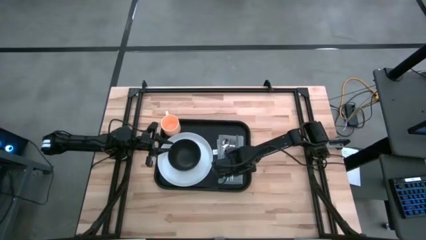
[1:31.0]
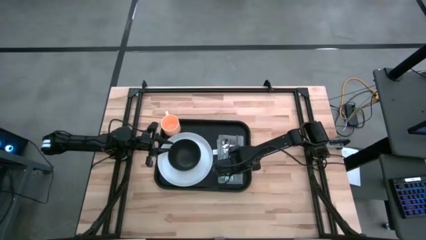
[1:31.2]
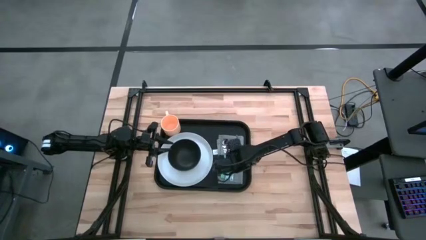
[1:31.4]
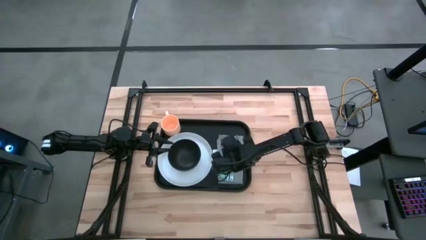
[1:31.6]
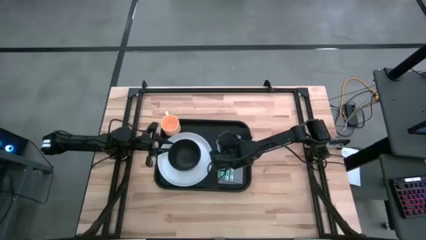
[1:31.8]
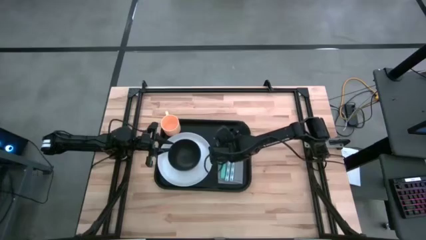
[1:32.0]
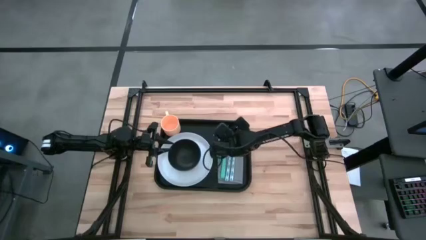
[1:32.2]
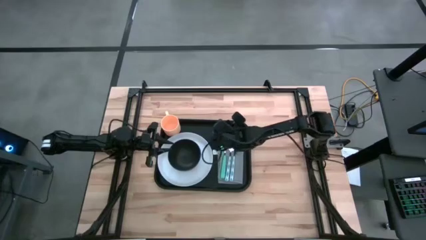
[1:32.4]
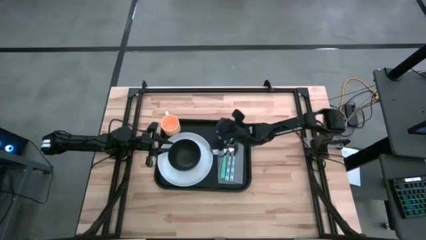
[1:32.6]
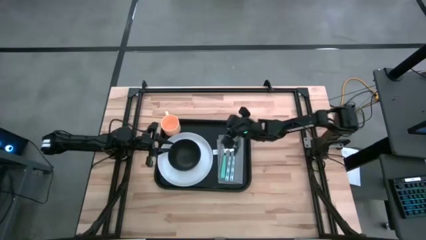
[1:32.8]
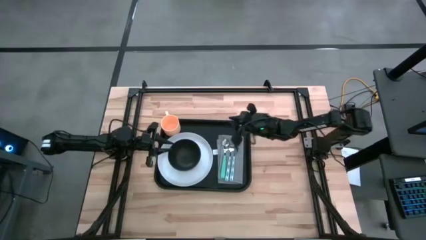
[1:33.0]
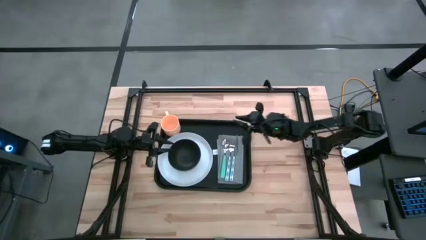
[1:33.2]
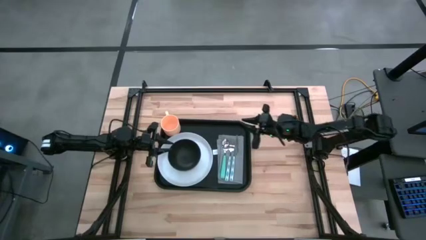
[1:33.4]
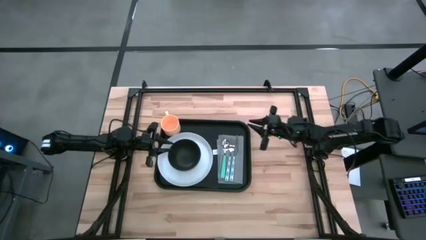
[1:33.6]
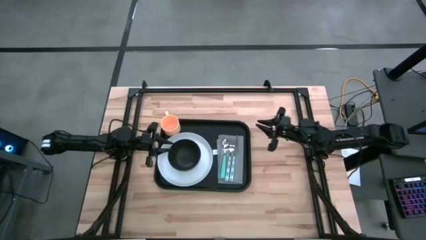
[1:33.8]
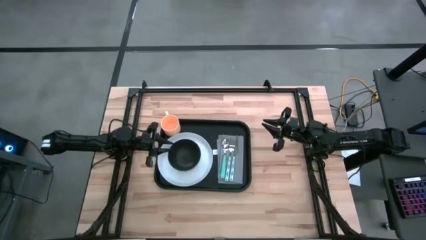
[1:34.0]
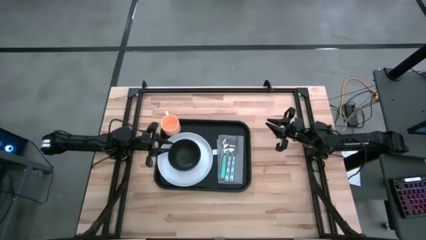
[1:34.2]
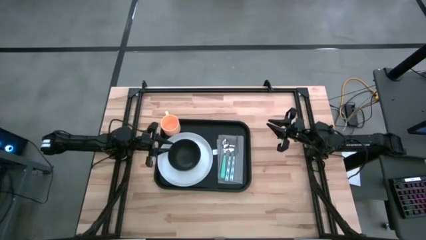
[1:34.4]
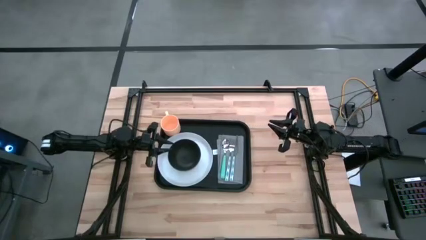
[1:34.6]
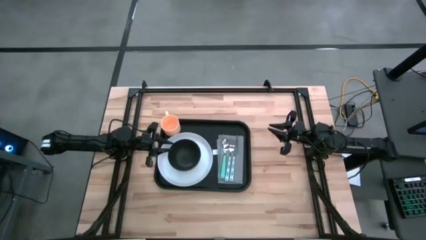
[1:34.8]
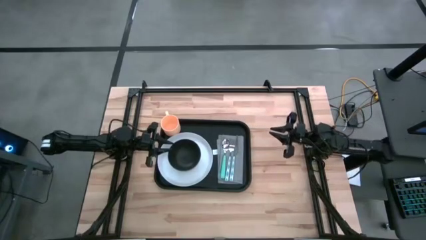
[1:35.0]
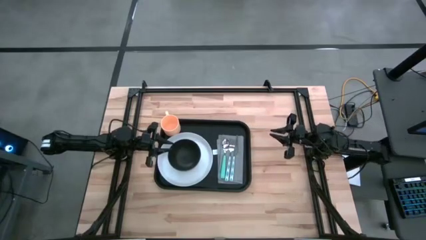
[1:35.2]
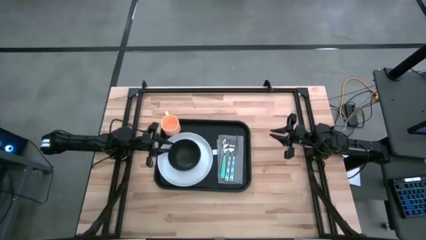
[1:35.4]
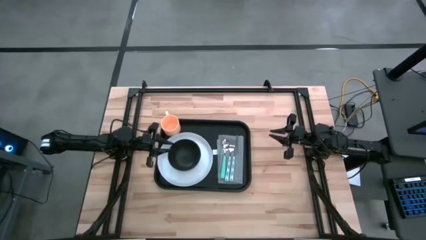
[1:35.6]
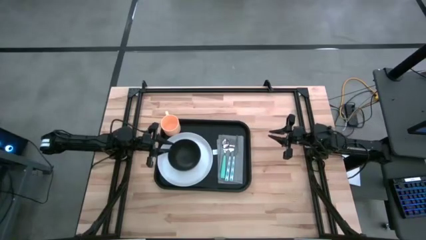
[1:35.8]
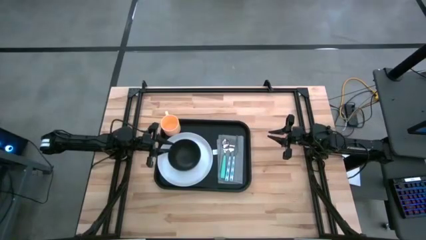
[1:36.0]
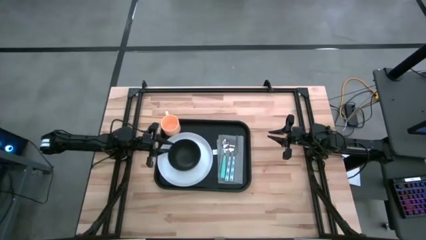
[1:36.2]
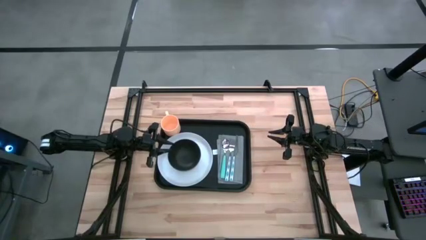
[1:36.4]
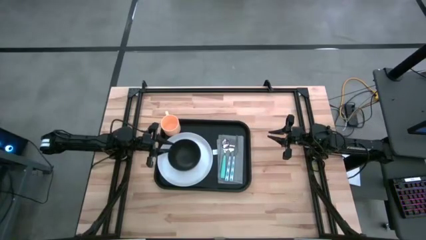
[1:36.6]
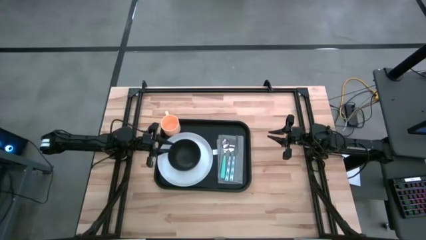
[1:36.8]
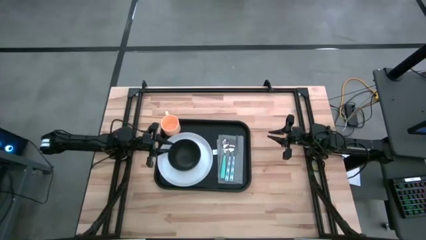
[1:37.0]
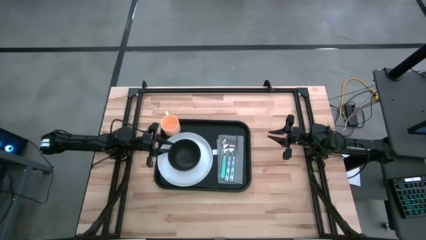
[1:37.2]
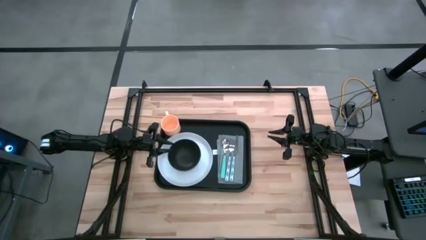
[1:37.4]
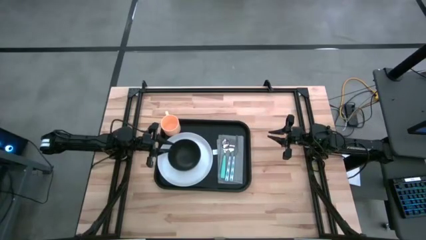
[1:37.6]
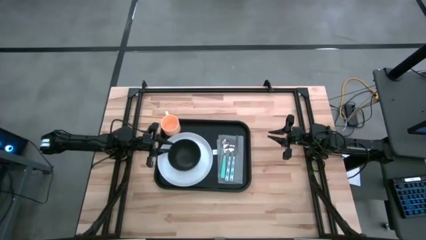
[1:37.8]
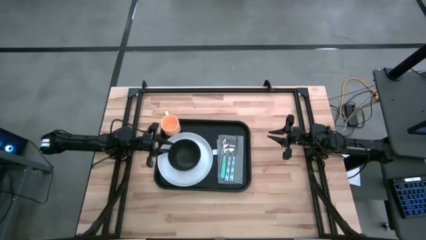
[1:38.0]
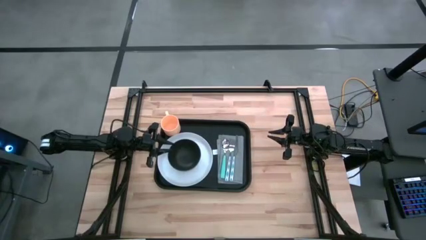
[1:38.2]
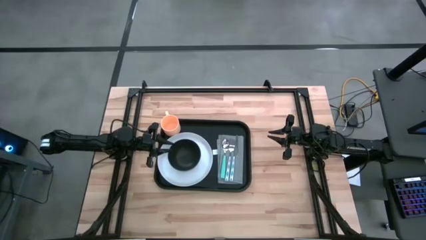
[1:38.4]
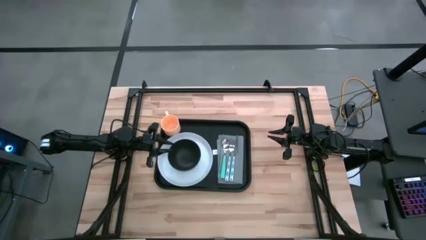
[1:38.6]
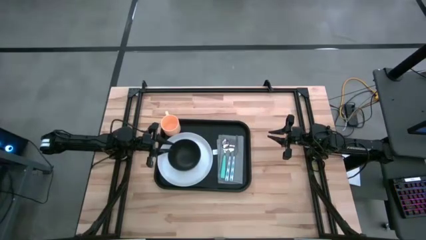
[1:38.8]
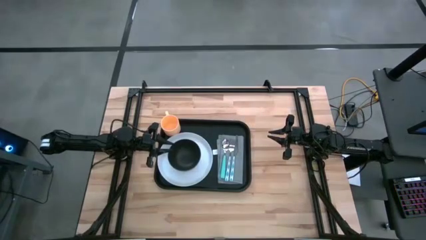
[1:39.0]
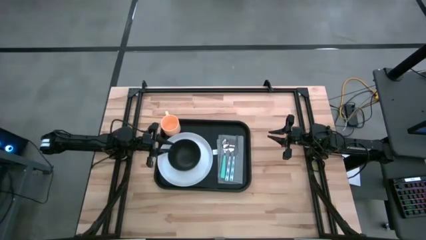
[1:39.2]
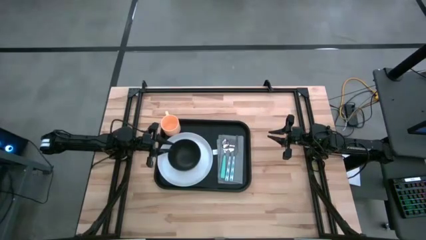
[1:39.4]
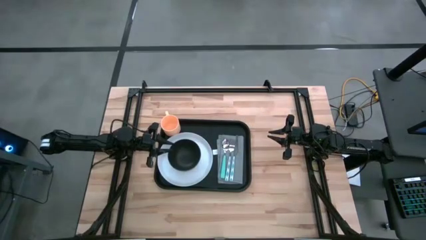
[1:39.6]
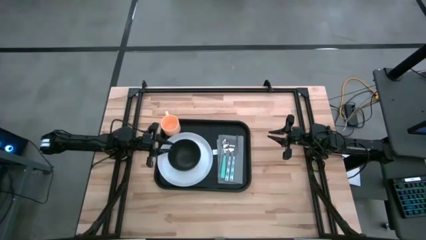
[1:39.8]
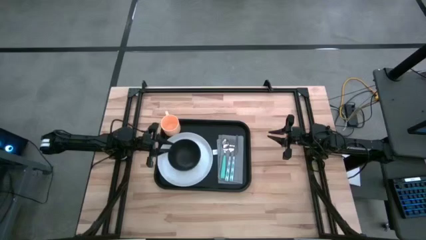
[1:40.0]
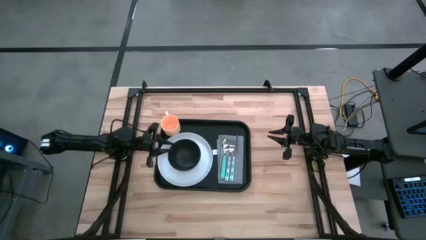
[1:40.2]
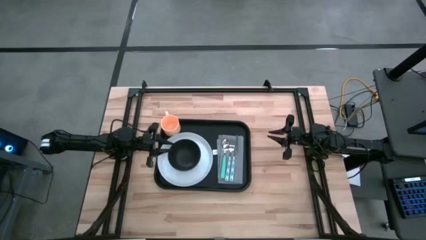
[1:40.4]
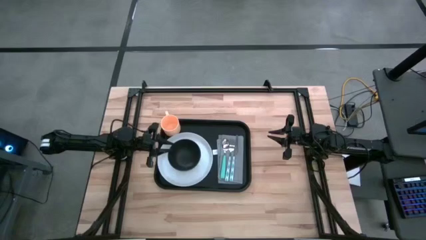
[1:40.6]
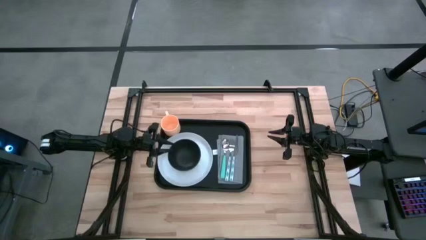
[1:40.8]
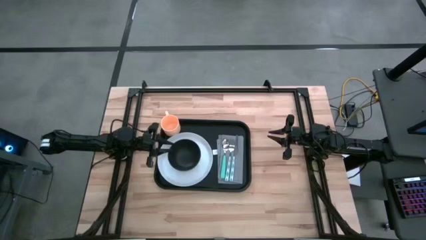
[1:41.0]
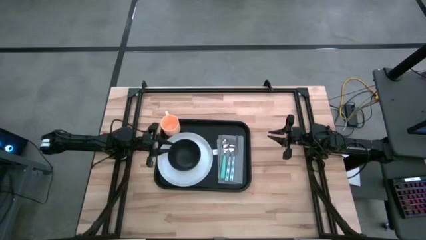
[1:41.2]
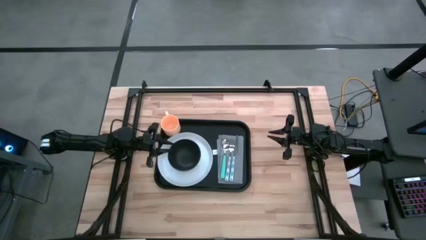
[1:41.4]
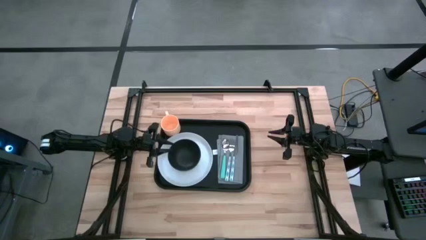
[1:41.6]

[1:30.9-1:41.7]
Task: Set up tray
Return to Home Position

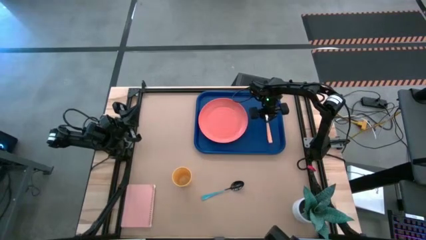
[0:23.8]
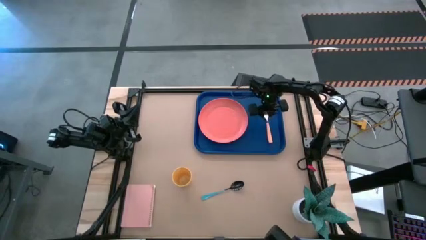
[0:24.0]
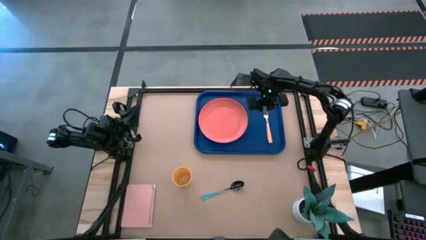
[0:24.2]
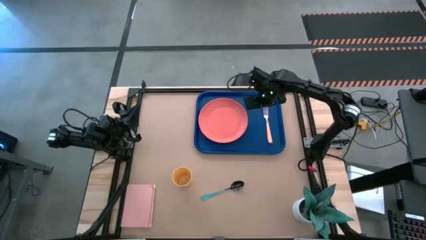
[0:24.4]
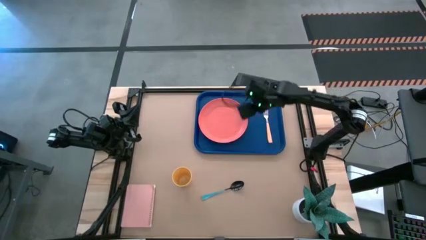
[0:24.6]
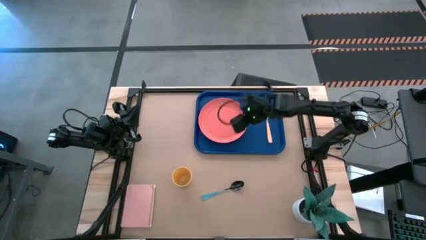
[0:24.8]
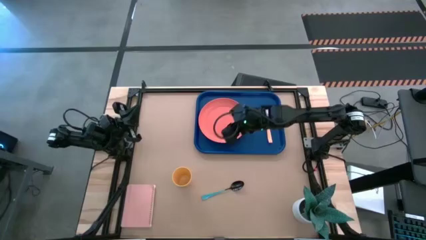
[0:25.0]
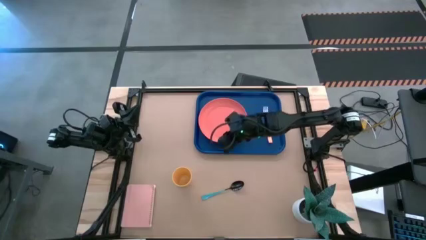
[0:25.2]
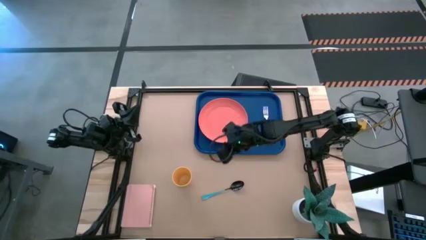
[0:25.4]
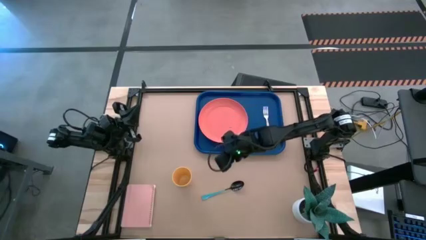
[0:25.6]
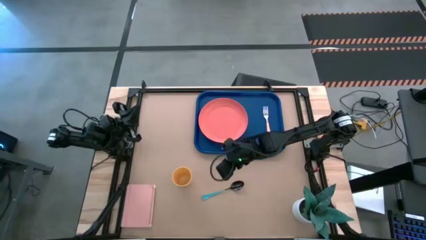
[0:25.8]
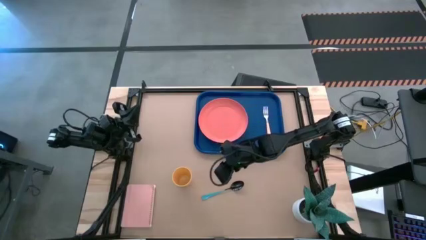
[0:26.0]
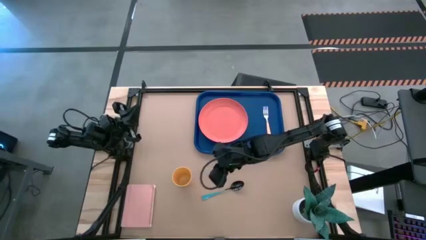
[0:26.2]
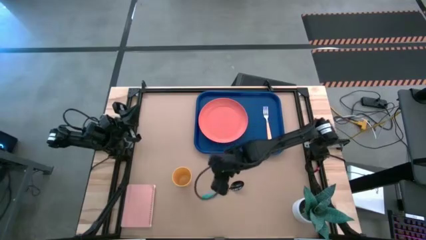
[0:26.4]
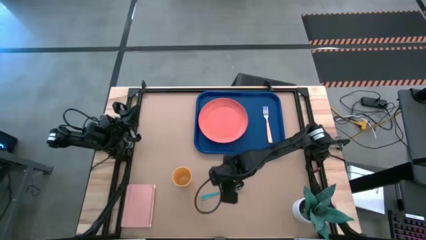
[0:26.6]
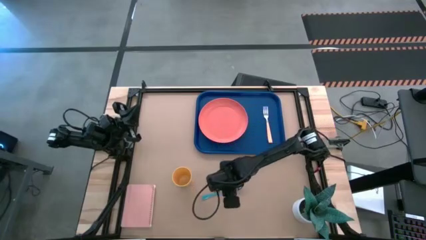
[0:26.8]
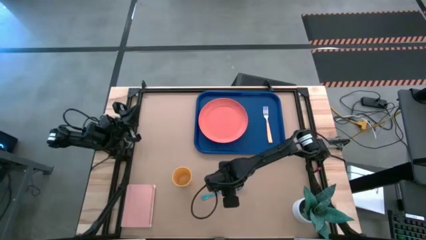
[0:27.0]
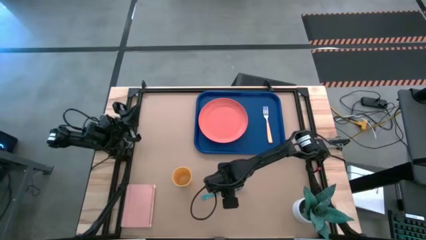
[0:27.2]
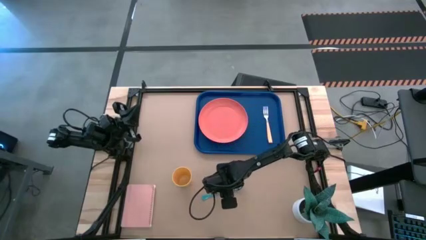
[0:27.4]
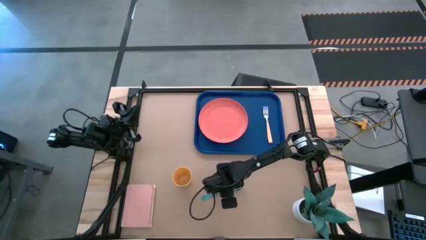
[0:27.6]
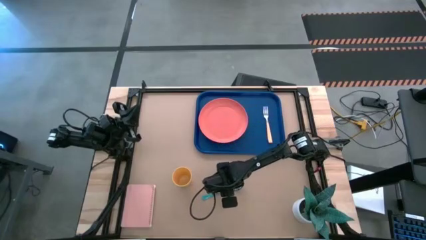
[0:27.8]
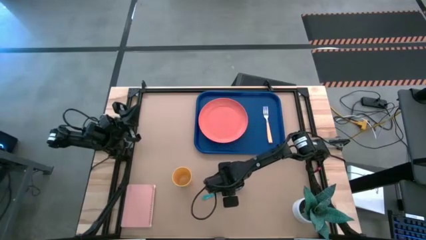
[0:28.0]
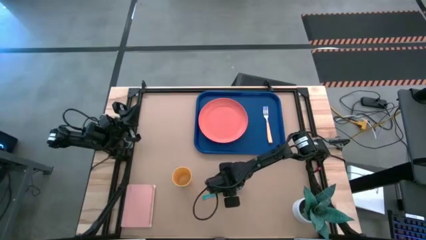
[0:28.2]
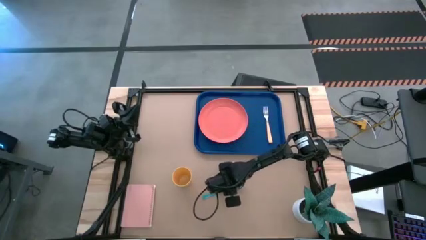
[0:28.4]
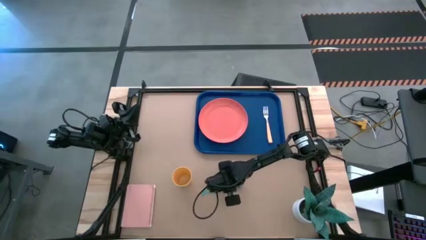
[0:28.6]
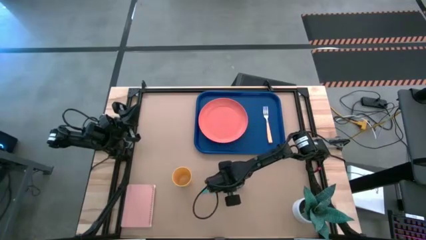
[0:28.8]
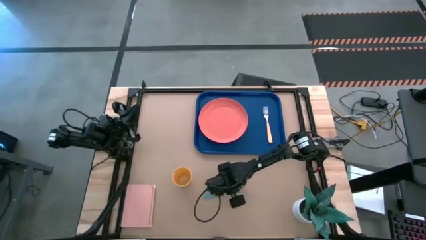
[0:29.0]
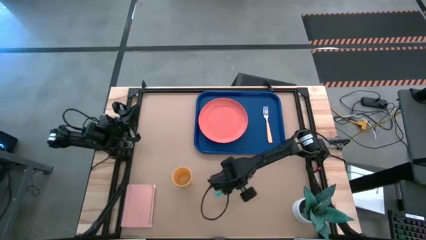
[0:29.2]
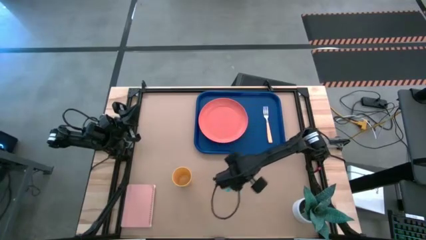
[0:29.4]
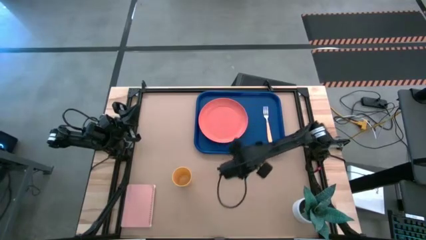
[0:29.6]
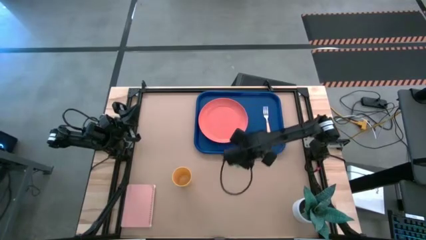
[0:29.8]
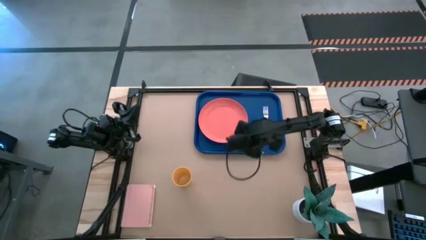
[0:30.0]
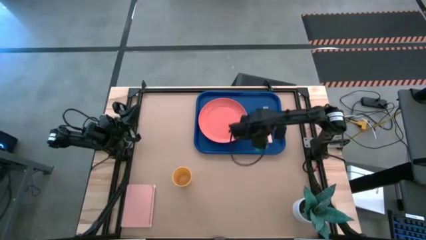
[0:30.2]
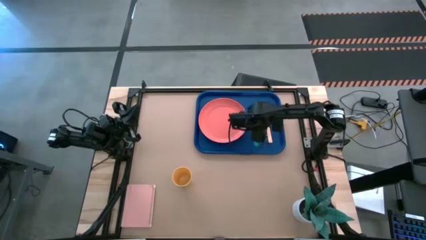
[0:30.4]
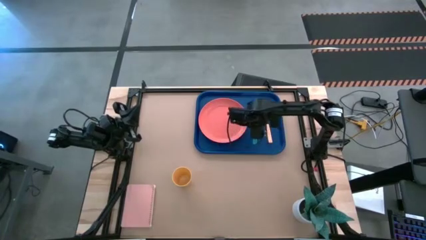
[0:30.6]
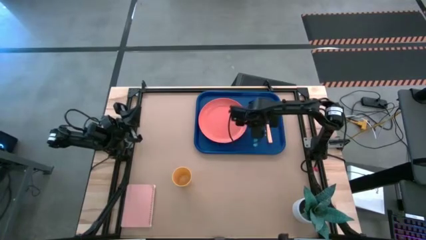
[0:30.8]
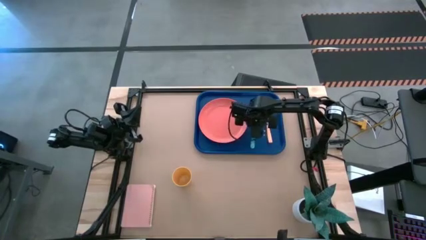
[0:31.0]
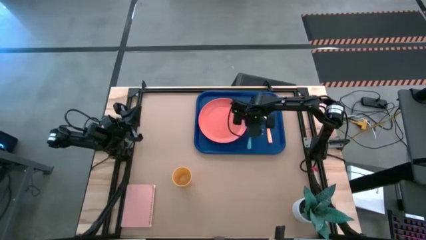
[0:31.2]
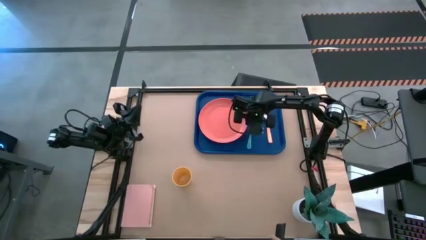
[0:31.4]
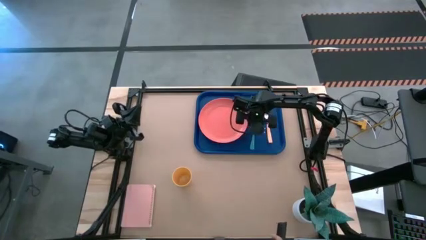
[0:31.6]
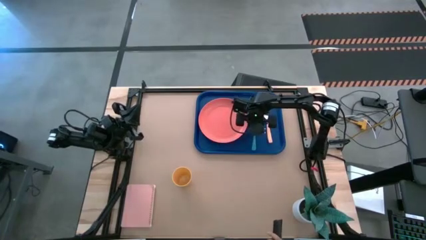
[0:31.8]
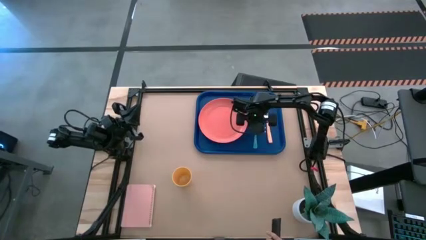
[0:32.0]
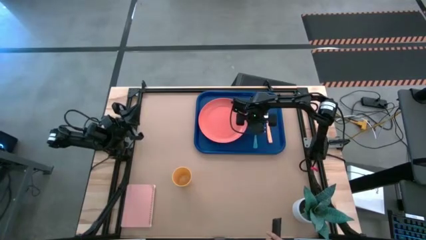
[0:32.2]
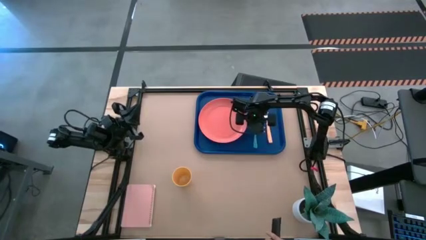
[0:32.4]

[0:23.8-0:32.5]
Task: Pick and place plate/cup/fork/spoon on tray
Put the blue spoon the fork on the blue serving tray to the right of the orange plate
